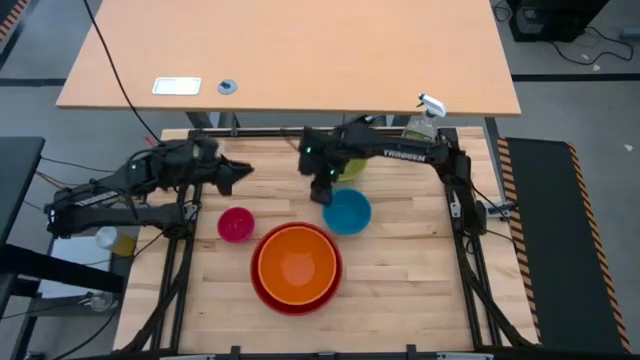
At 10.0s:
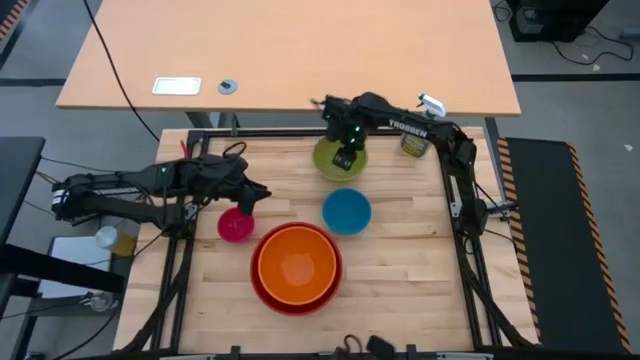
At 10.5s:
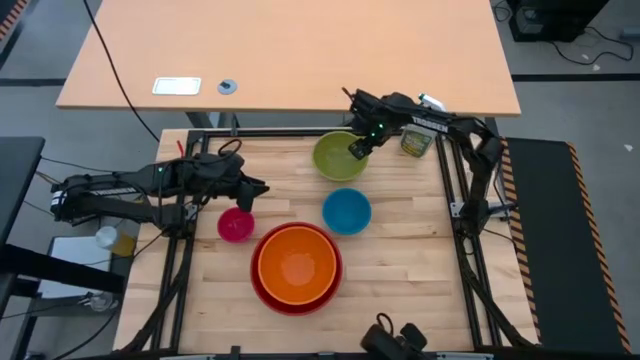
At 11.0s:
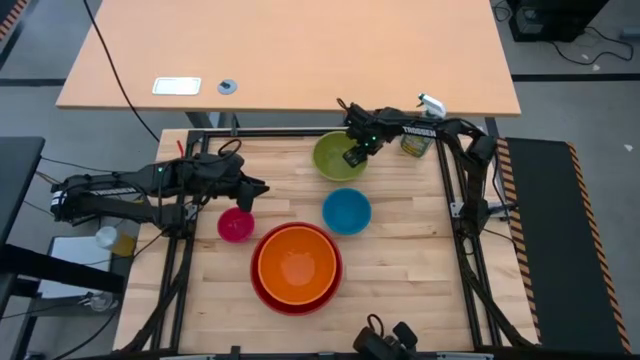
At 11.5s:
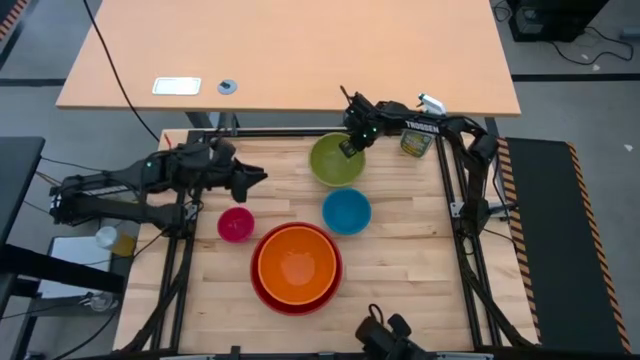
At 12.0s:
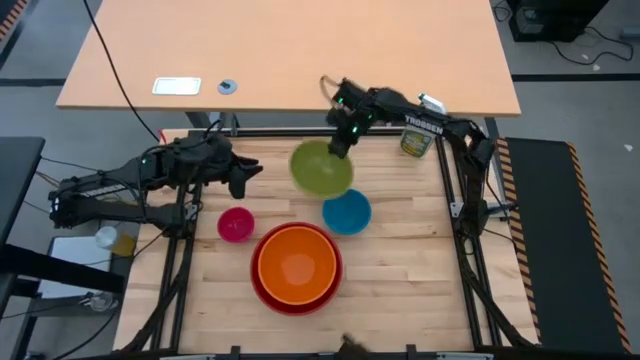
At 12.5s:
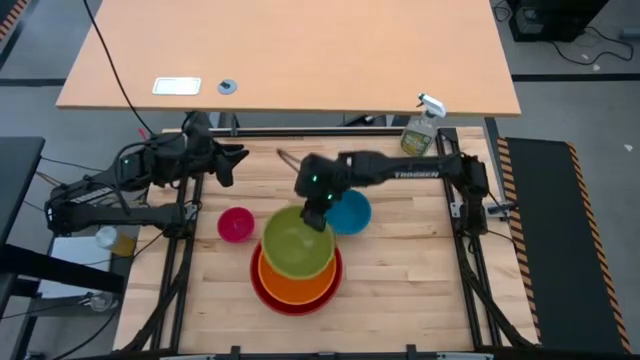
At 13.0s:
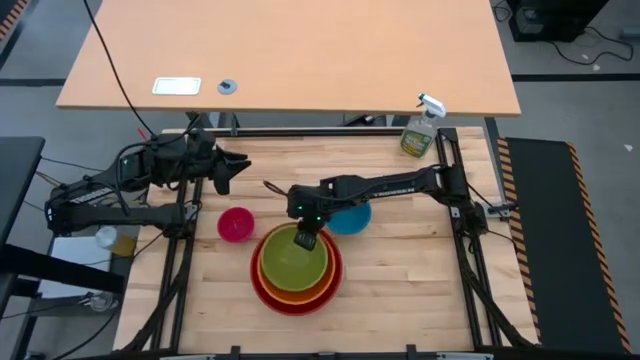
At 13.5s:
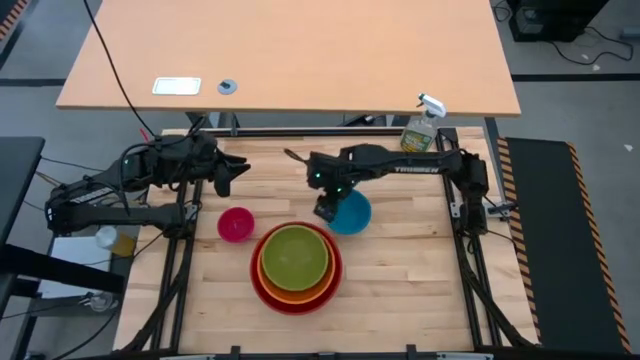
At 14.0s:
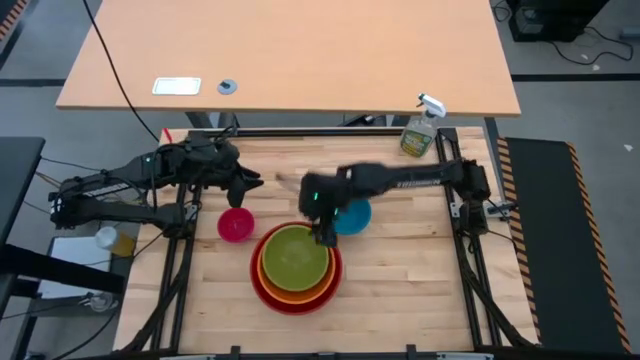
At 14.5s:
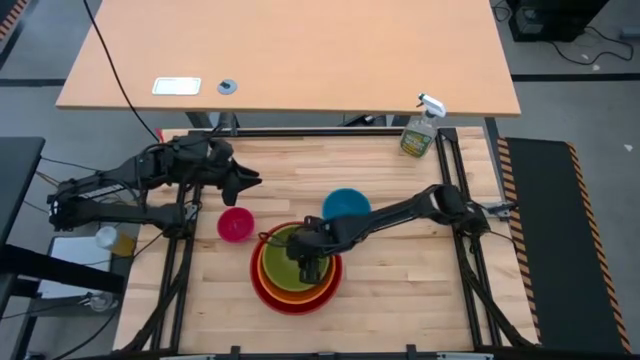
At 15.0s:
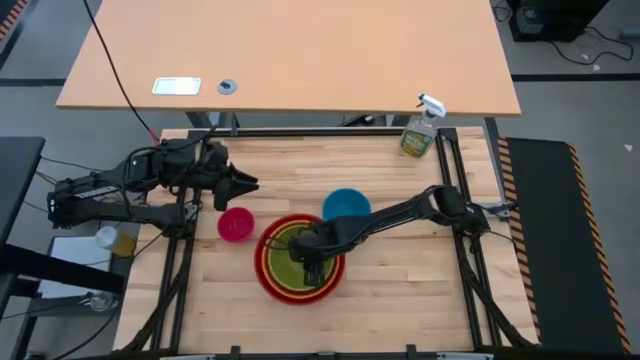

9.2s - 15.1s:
Stack the green bowl on top of the orange bowl

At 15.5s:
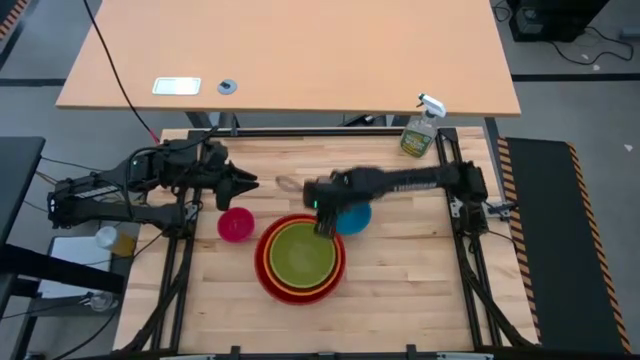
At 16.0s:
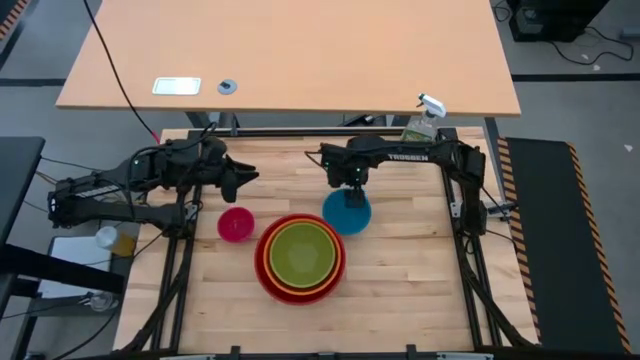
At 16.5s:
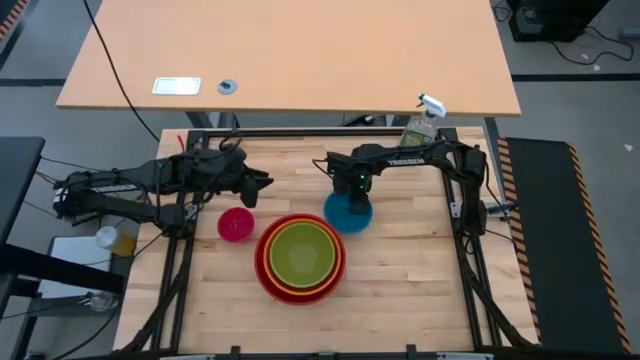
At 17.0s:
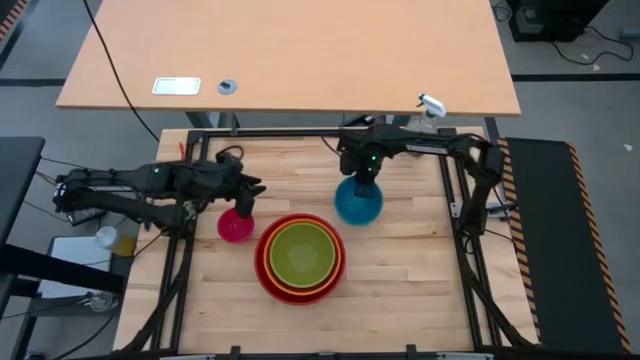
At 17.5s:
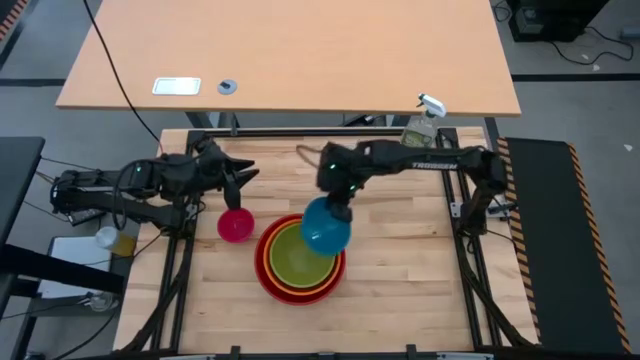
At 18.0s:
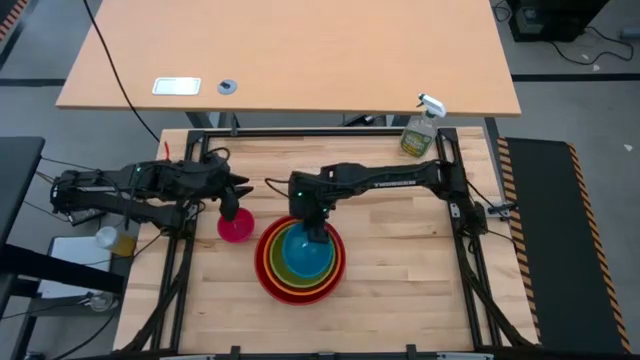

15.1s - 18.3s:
Stack the blue bowl on top of the green bowl

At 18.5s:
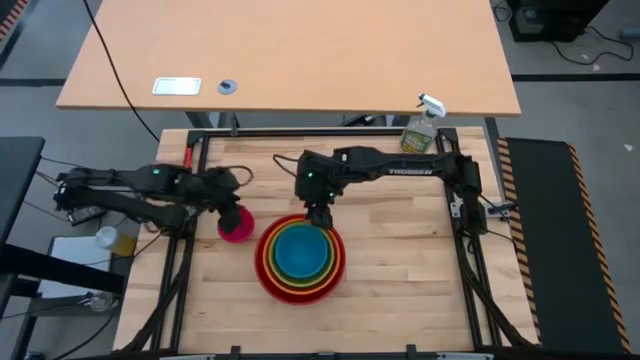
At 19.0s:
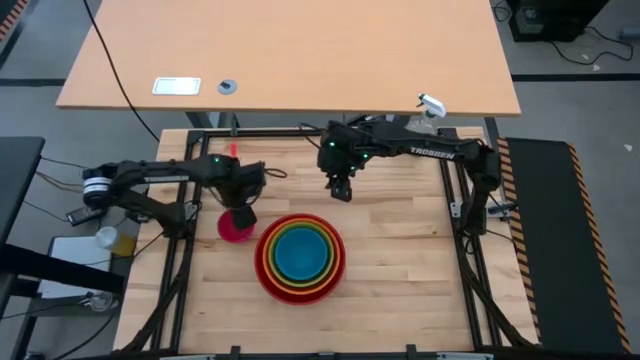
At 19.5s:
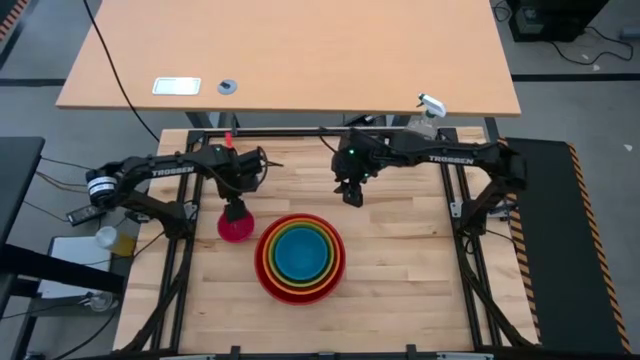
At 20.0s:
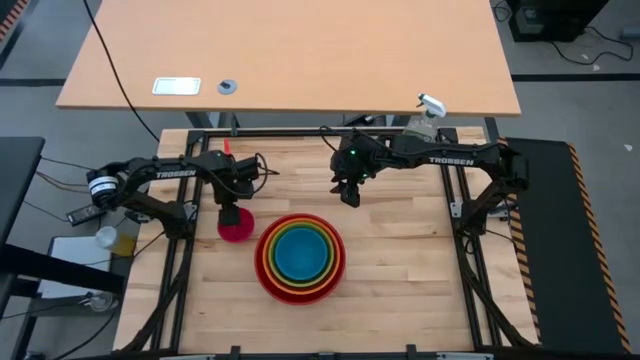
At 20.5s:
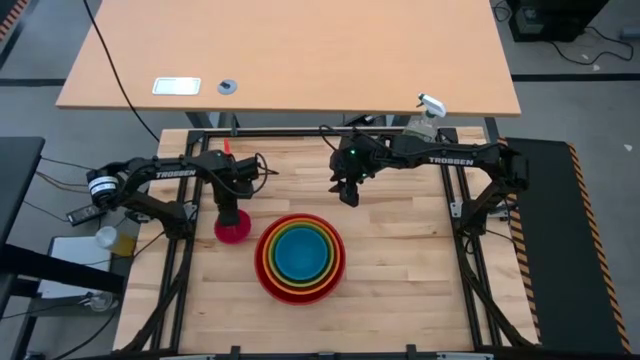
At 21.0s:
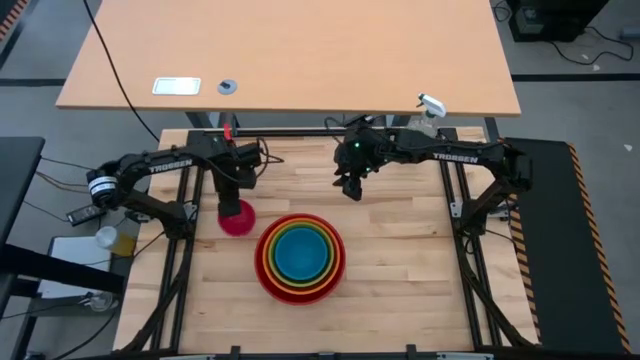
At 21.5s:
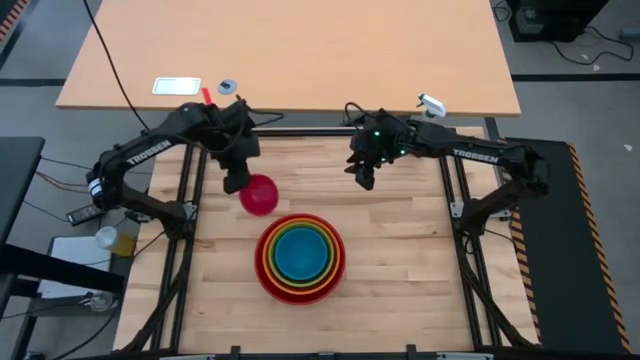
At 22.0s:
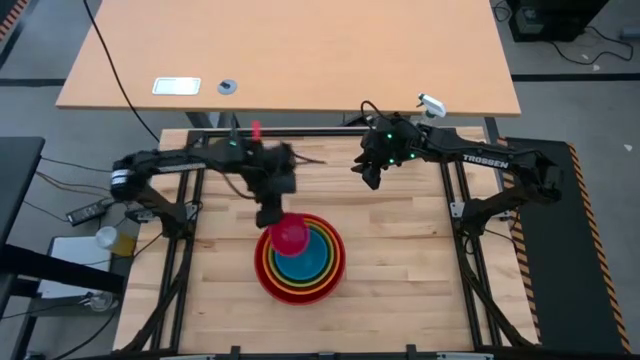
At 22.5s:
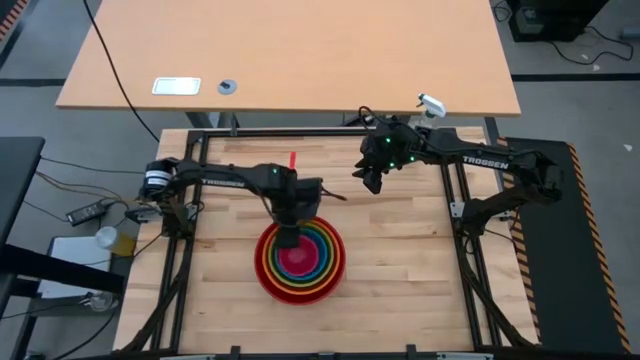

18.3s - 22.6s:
Stack the pink bowl on top of the blue bowl

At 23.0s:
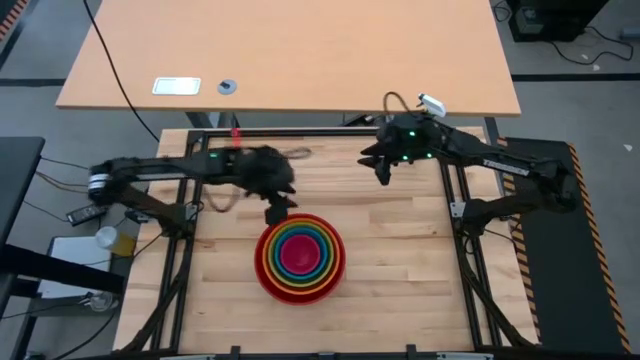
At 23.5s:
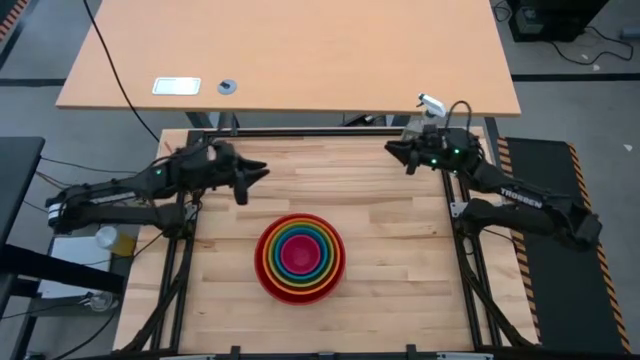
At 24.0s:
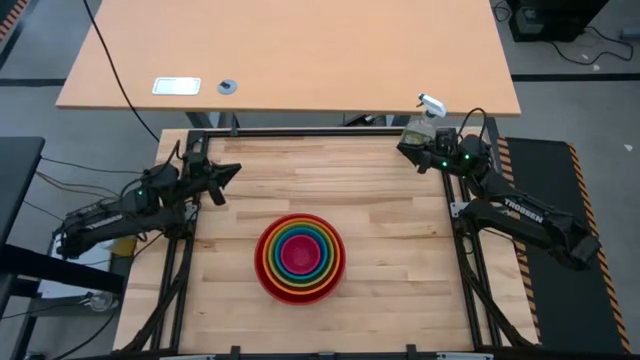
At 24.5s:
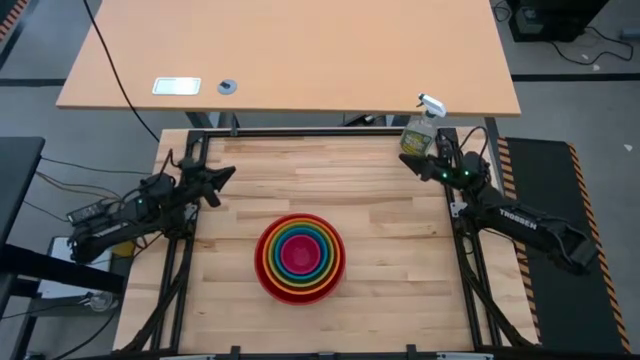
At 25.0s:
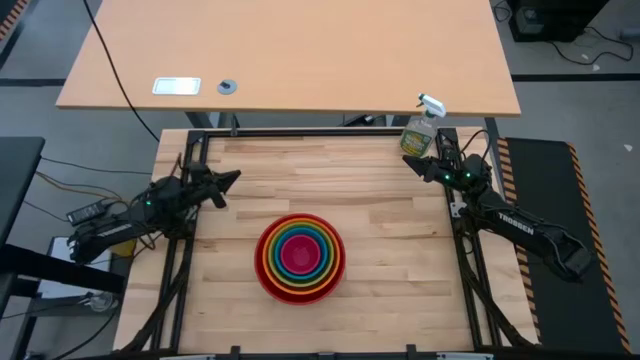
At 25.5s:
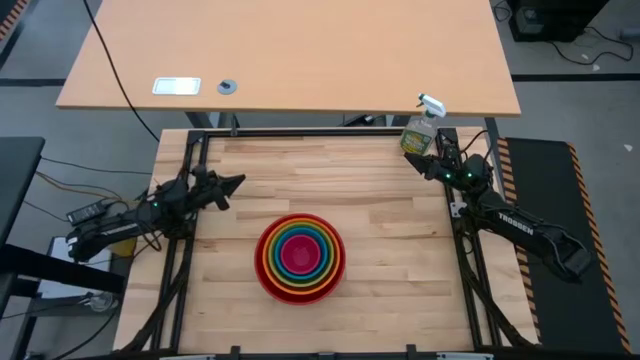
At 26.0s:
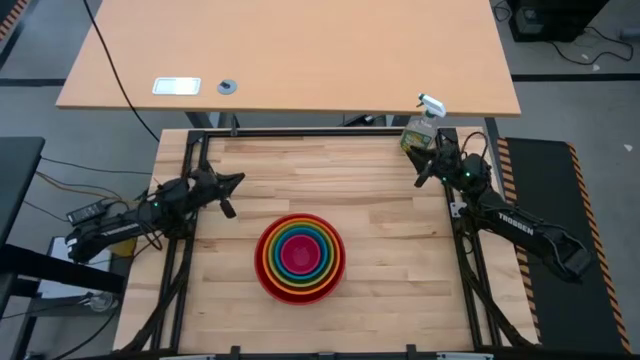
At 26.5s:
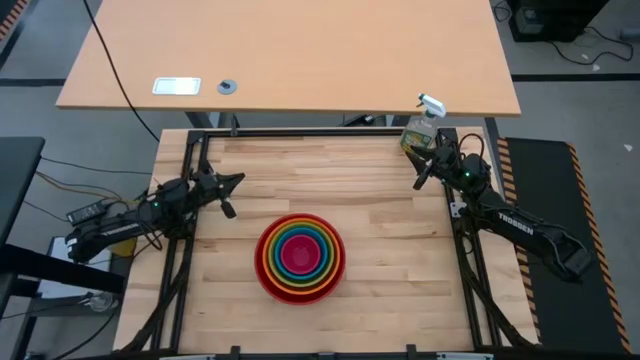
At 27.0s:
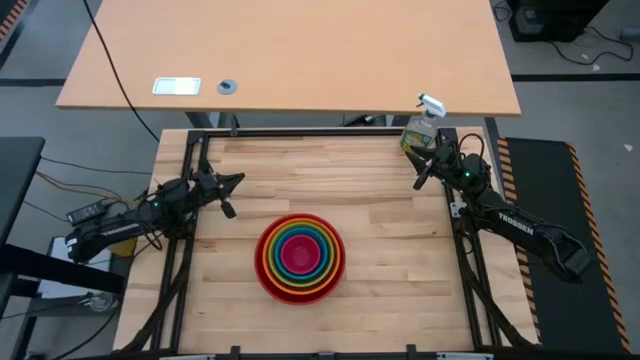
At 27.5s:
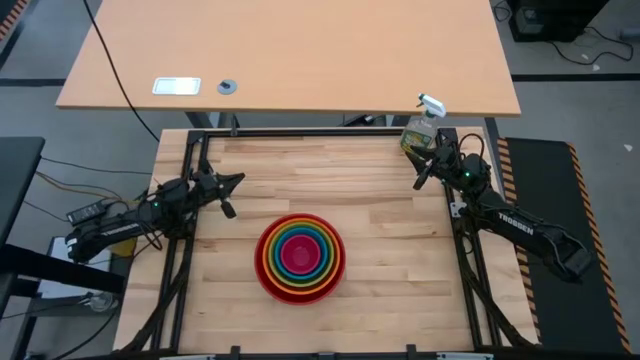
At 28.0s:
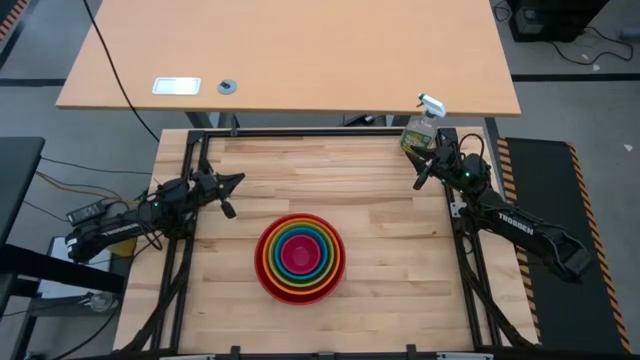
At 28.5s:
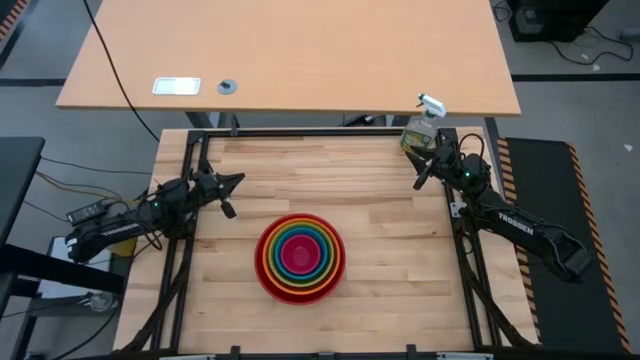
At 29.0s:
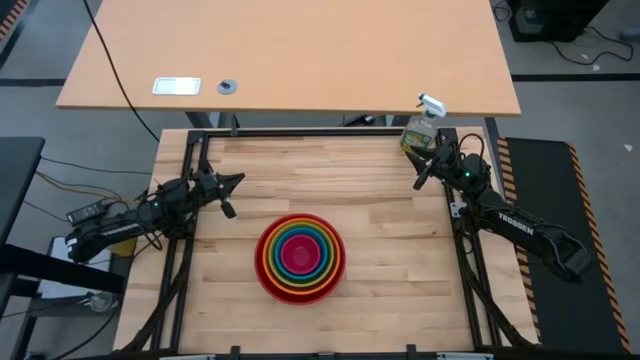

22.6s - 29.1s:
Return to Home Position
